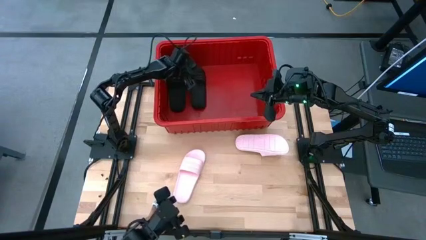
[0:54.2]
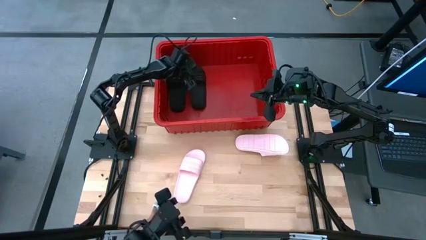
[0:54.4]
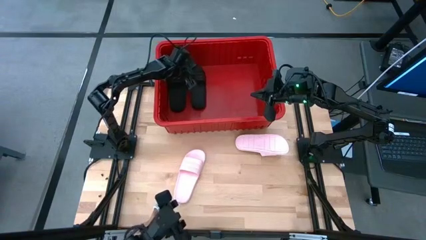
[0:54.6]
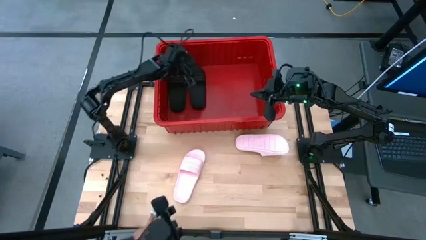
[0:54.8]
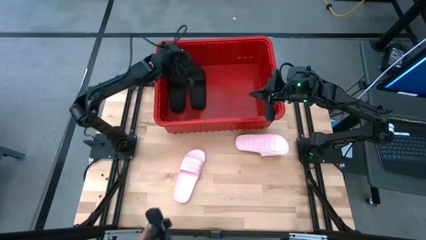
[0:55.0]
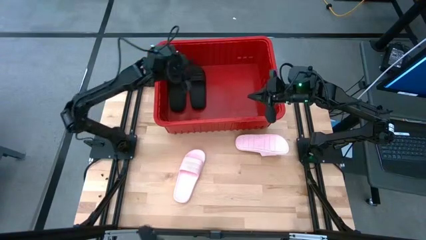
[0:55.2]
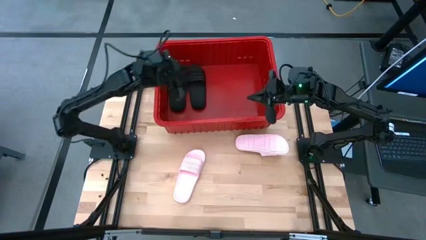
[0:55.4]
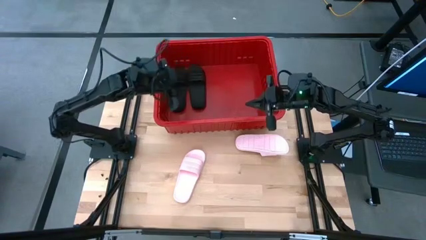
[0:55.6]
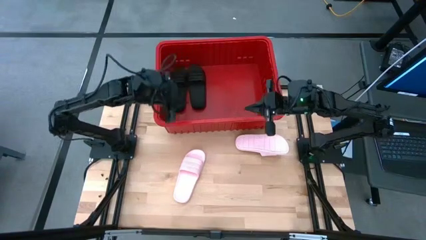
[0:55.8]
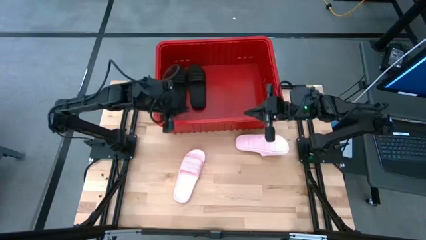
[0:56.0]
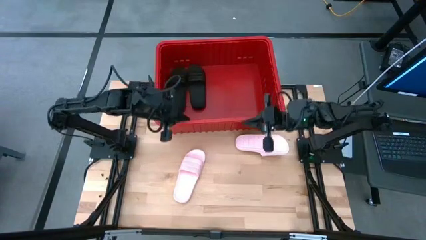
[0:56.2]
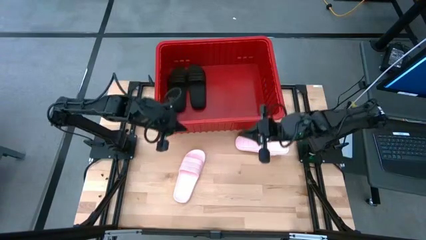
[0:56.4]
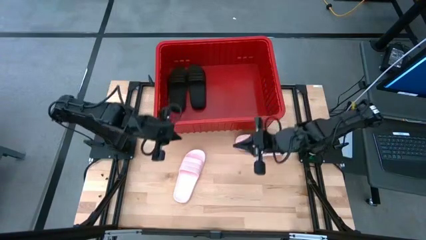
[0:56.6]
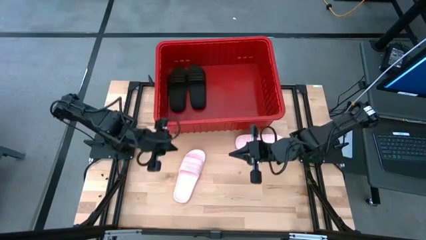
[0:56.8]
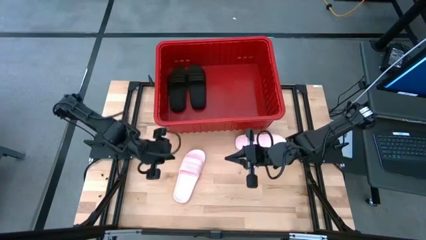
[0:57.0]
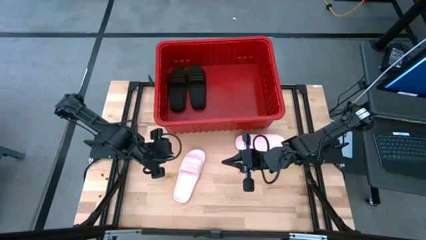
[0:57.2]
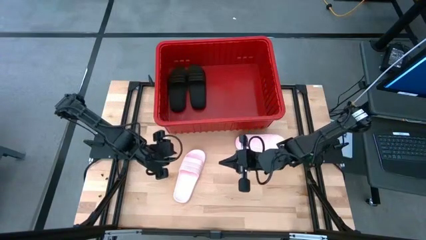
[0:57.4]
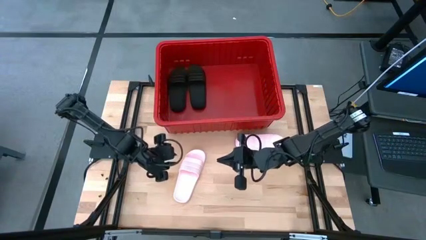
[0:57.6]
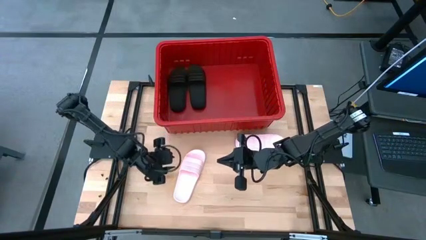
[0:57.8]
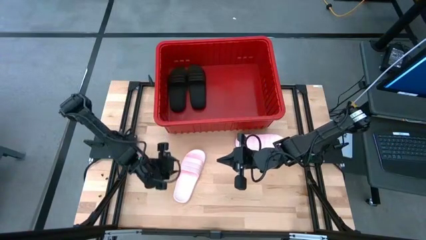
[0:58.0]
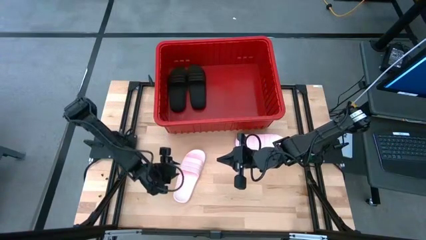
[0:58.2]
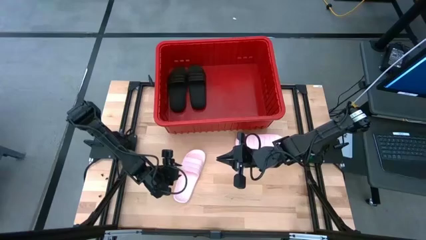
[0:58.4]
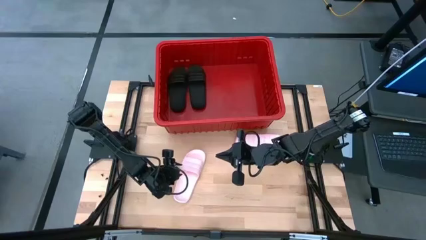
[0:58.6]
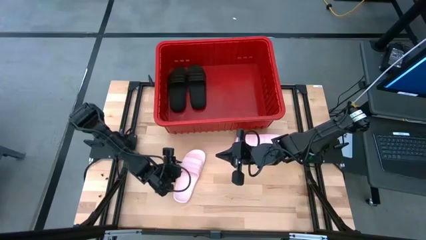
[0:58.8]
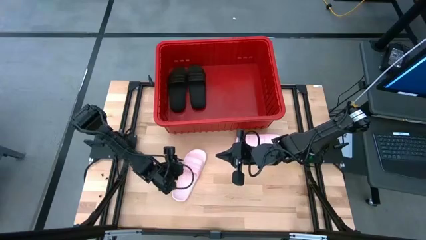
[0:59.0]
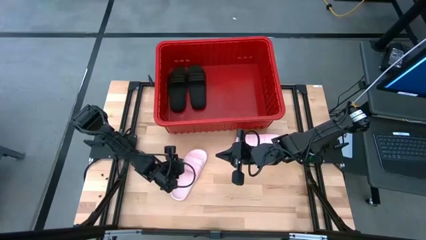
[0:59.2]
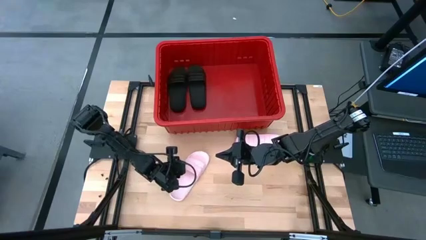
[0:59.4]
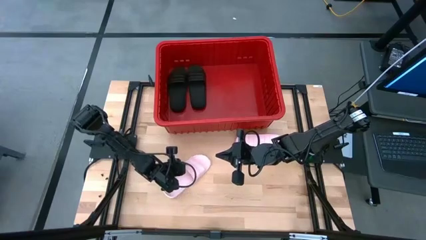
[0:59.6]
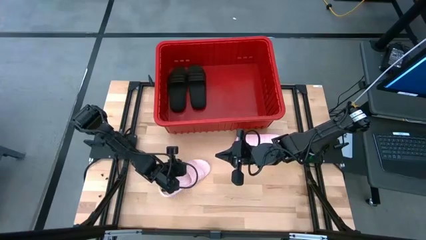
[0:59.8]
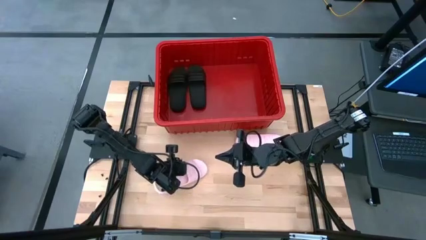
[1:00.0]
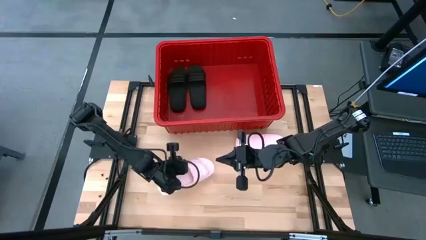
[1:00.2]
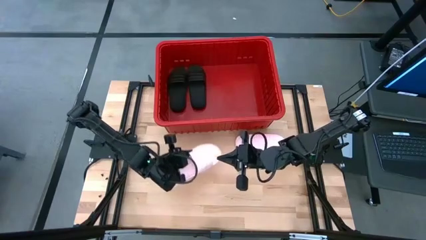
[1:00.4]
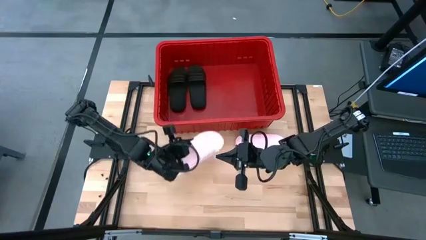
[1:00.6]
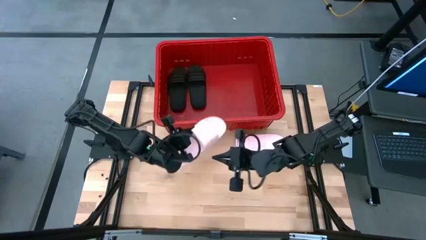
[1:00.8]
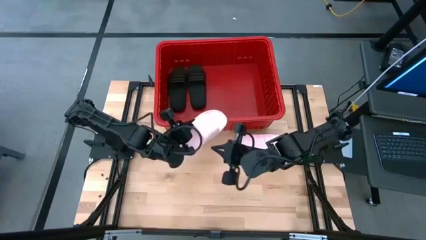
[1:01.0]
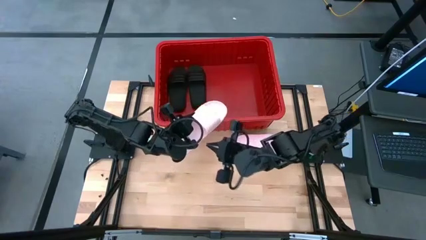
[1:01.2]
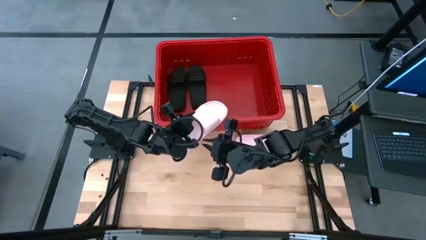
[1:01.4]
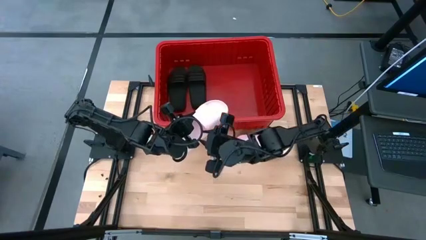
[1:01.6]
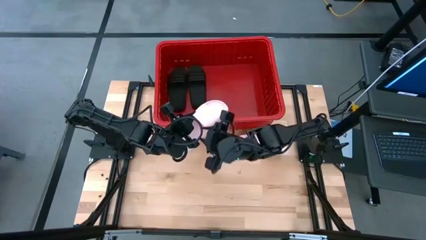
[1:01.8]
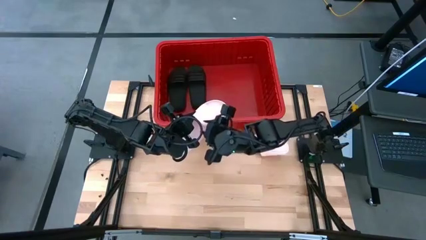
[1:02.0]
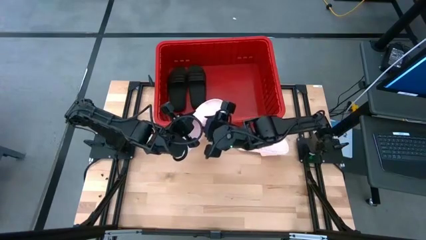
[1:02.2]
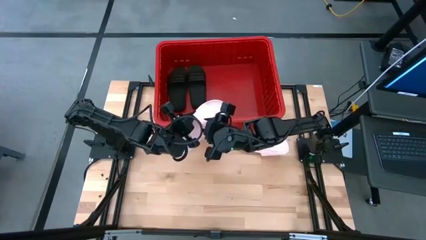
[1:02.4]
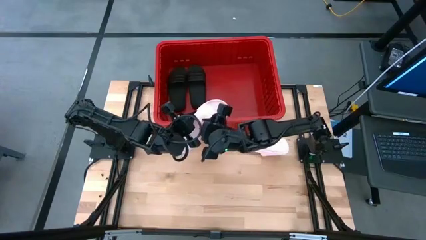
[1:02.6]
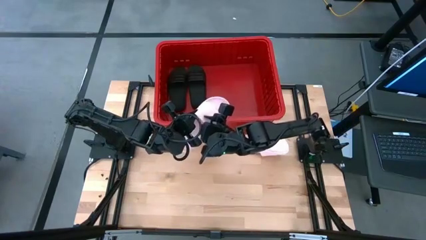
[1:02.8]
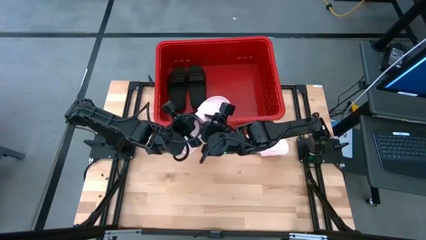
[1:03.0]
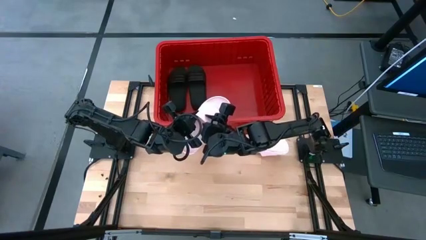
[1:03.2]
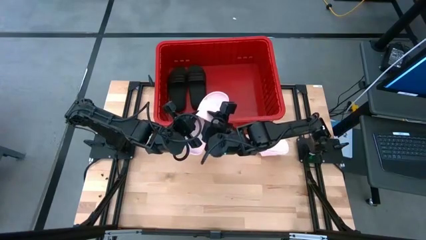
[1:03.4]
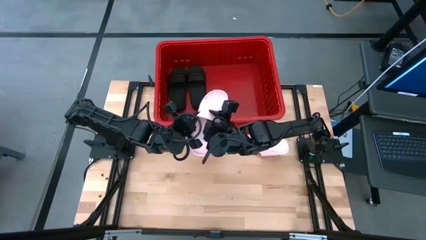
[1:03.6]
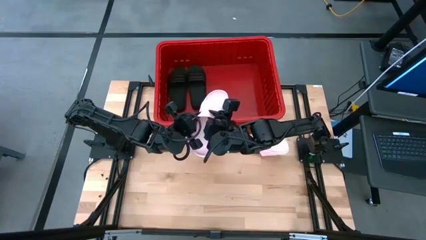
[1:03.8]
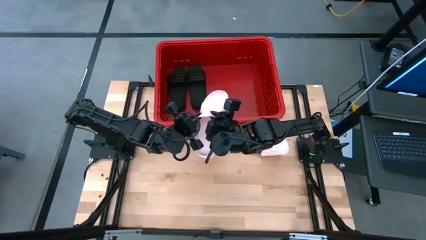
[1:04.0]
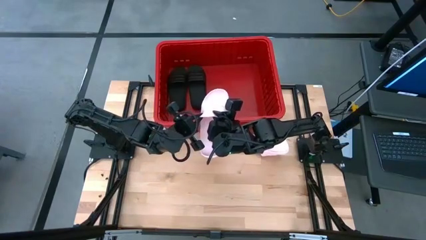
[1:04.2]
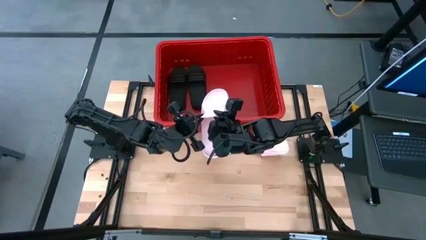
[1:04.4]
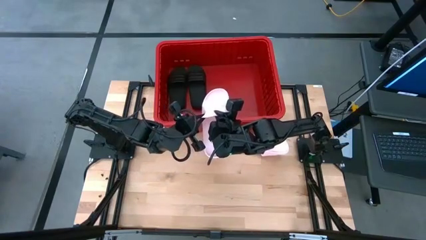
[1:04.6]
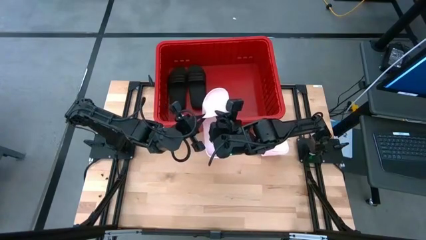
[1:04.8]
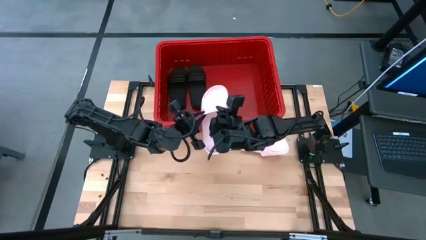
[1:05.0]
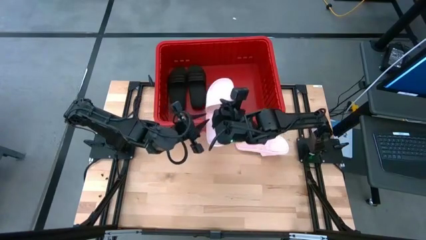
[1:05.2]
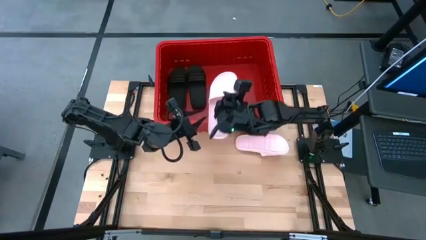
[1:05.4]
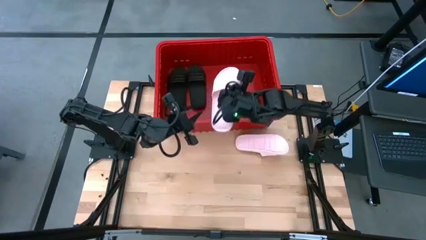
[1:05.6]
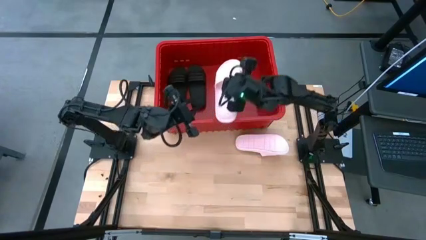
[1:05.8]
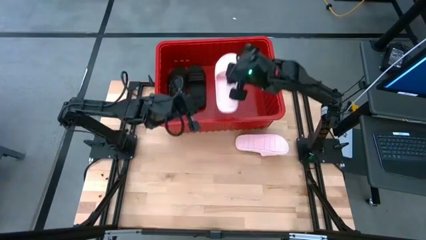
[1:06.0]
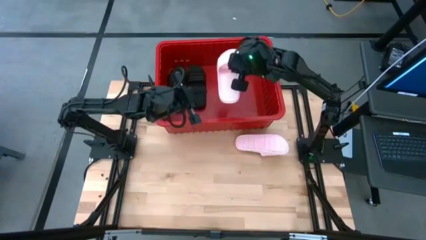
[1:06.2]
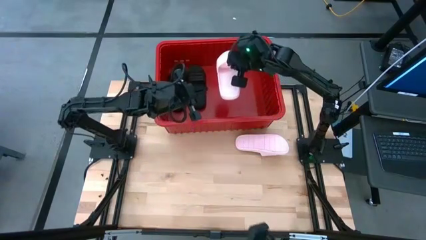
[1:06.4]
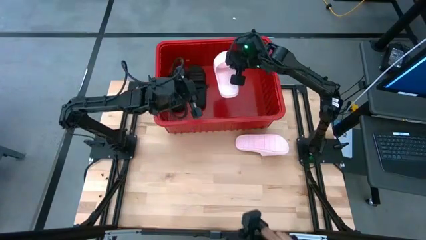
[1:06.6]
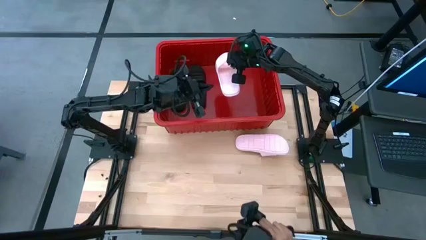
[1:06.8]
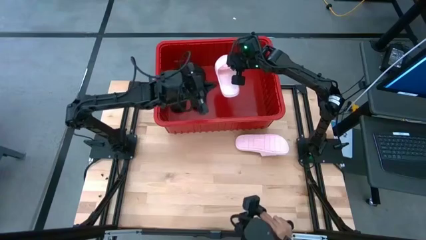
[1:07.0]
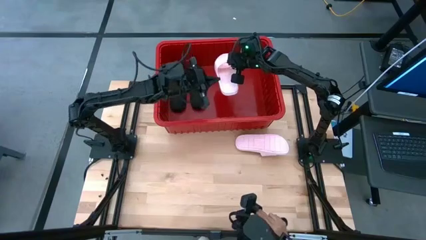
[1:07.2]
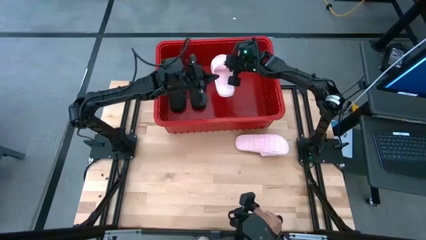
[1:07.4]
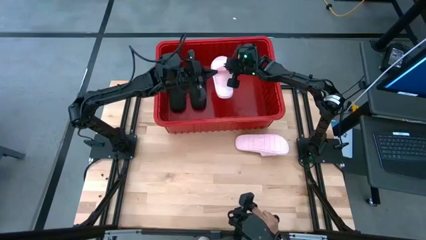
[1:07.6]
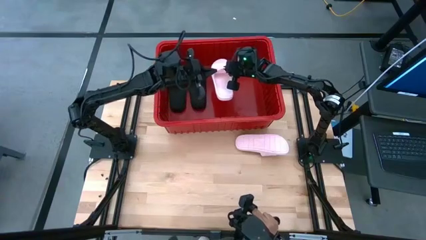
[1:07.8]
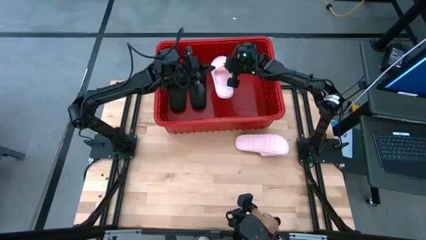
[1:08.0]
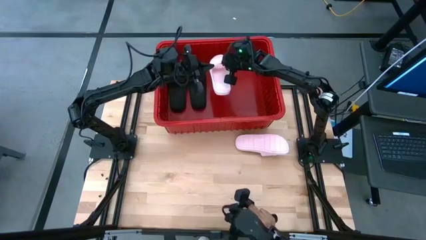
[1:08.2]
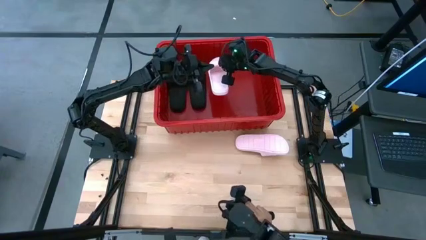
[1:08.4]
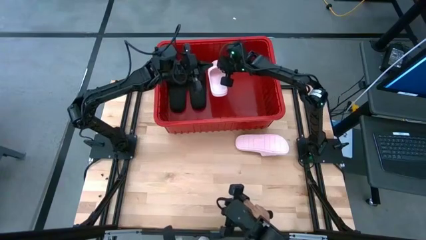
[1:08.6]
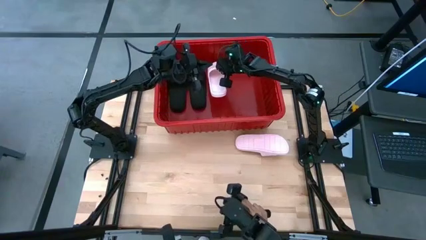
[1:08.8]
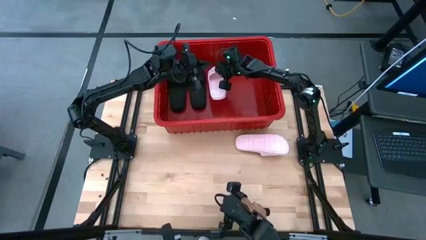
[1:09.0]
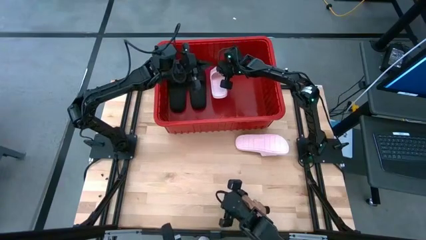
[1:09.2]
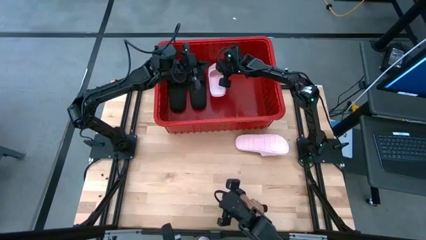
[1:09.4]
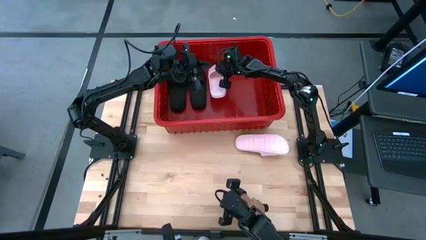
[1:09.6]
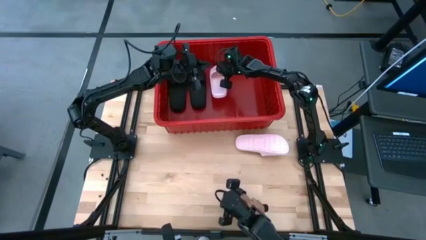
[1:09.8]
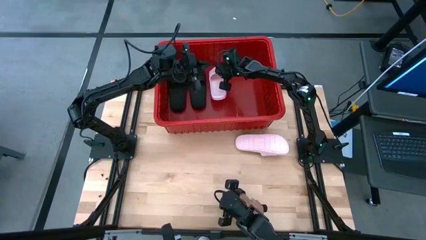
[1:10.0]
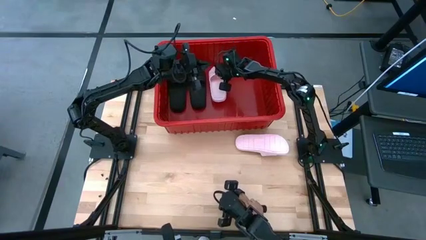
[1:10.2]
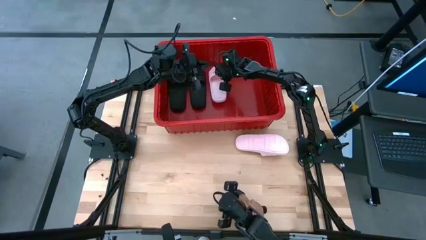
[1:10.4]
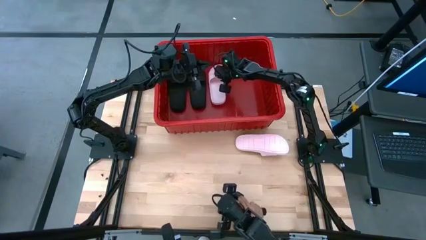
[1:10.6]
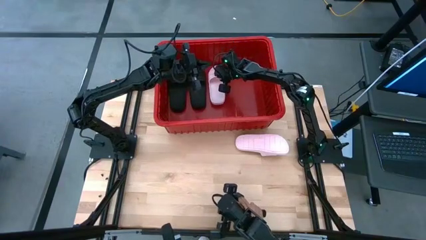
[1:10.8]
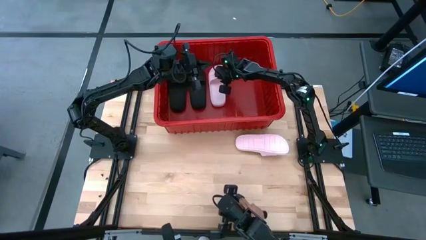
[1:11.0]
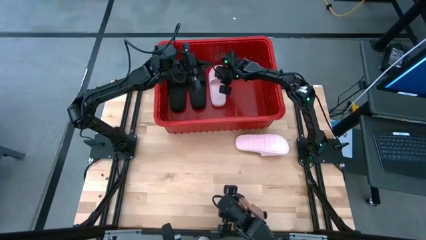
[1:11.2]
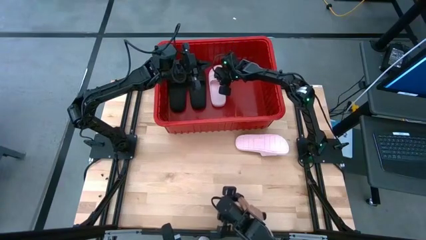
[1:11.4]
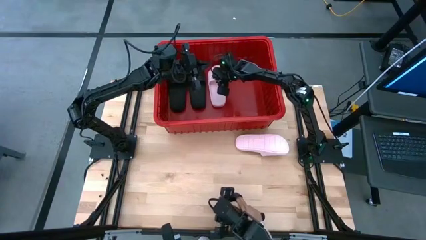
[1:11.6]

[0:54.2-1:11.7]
Task: Pick and place slides into bin
Put the left pink slipper into the red bin
